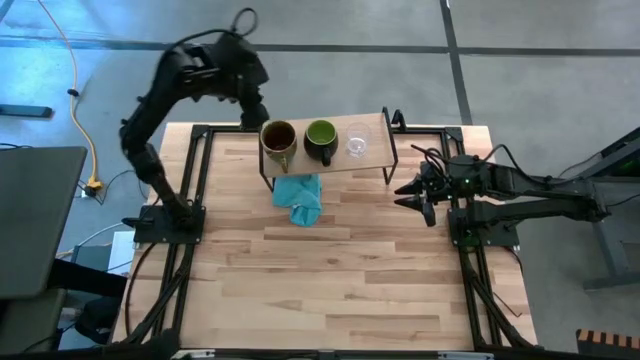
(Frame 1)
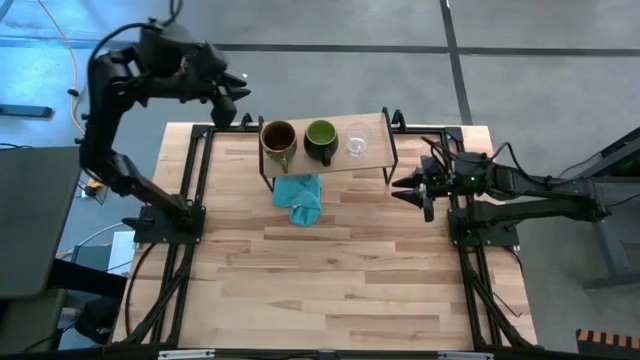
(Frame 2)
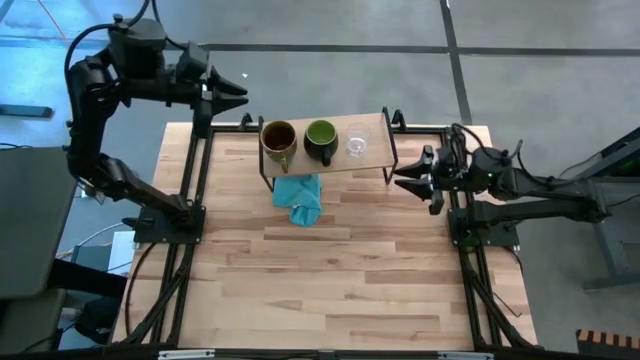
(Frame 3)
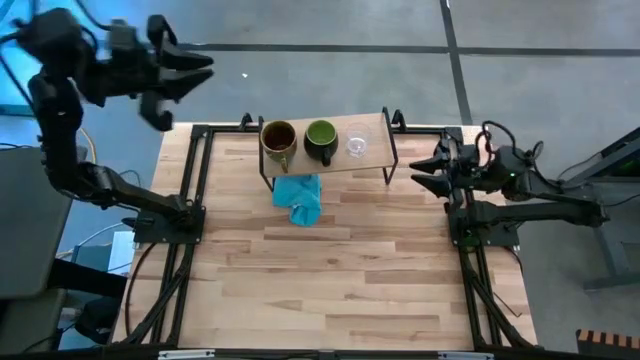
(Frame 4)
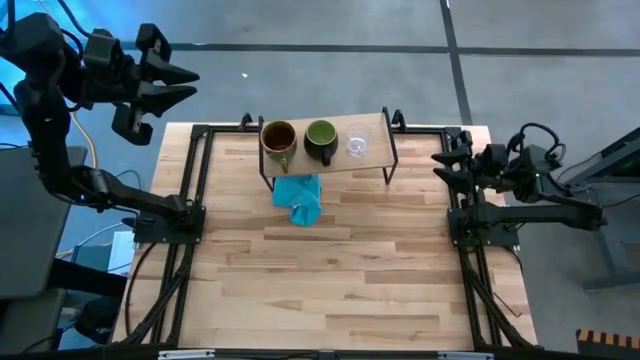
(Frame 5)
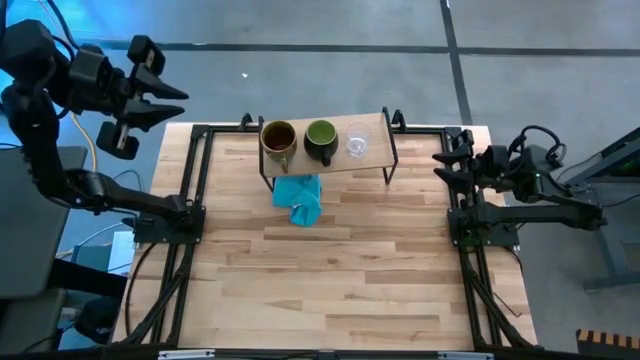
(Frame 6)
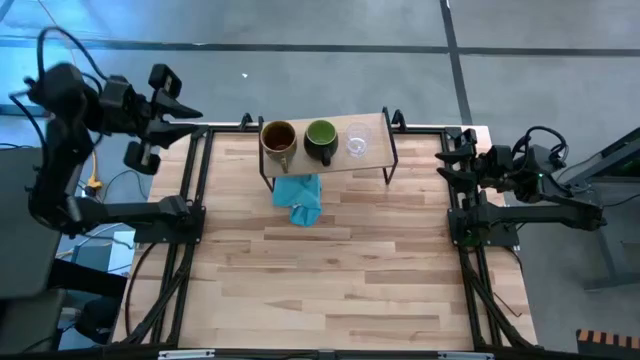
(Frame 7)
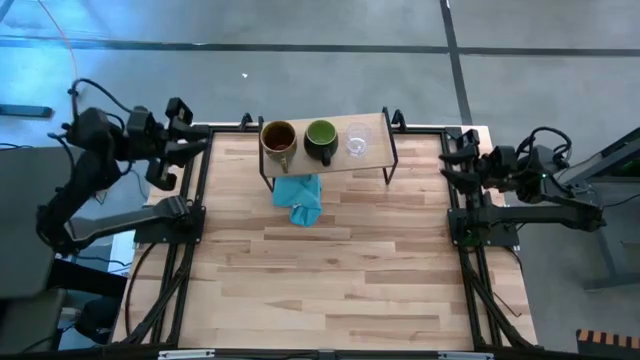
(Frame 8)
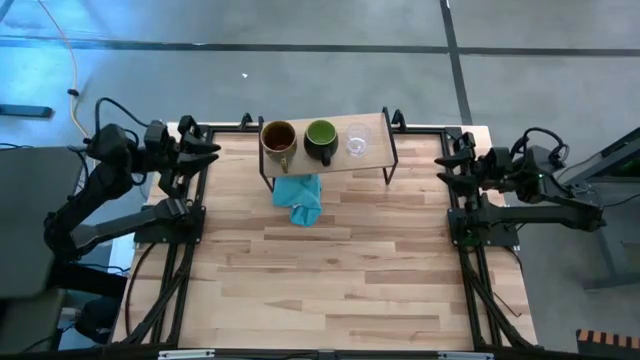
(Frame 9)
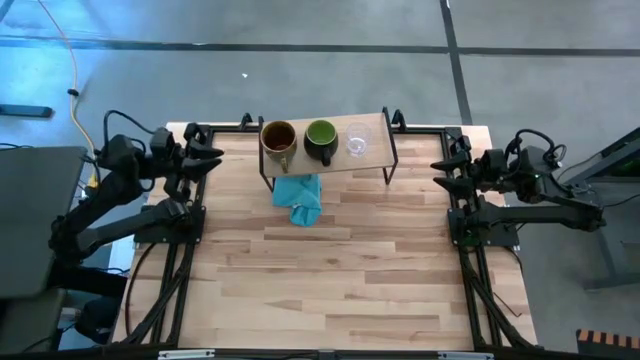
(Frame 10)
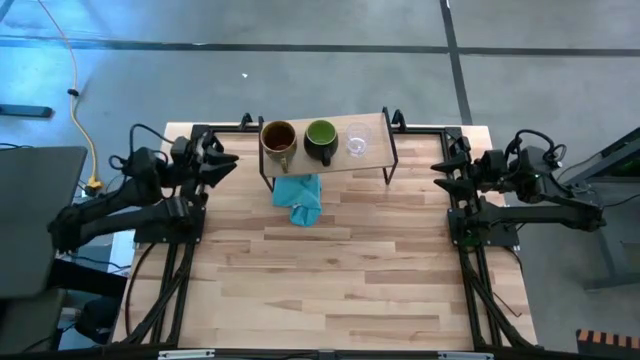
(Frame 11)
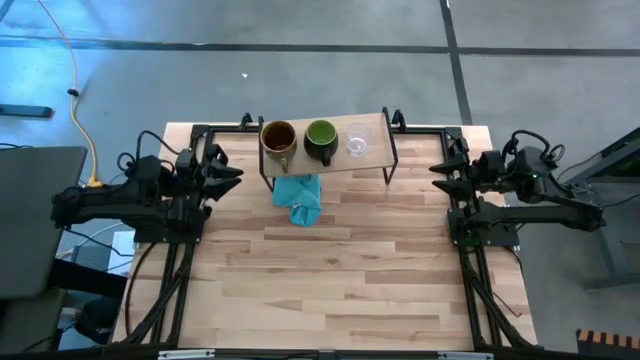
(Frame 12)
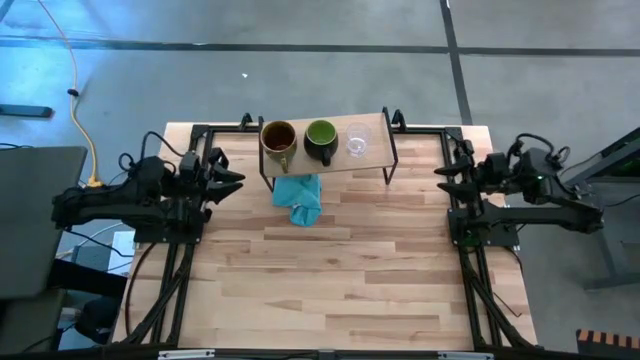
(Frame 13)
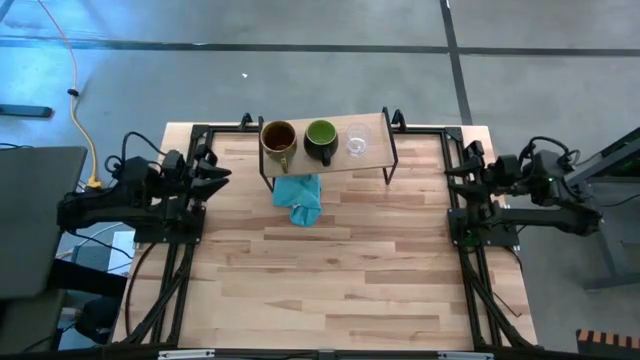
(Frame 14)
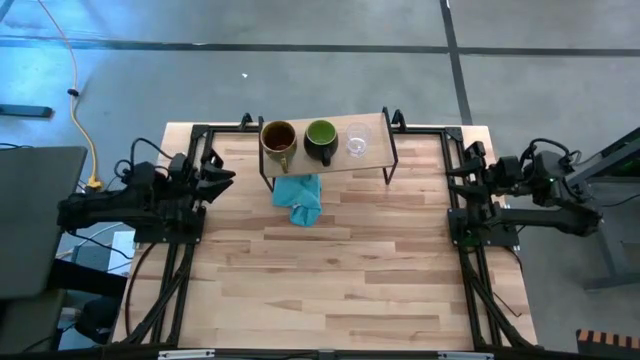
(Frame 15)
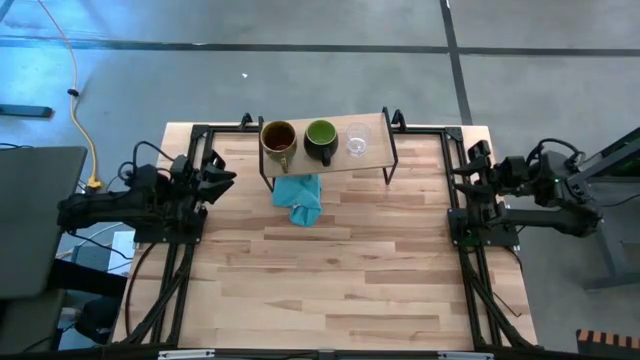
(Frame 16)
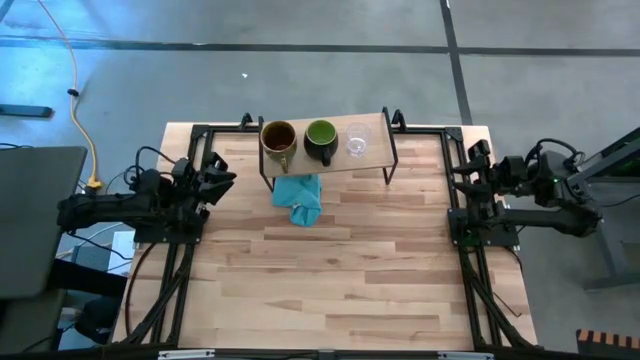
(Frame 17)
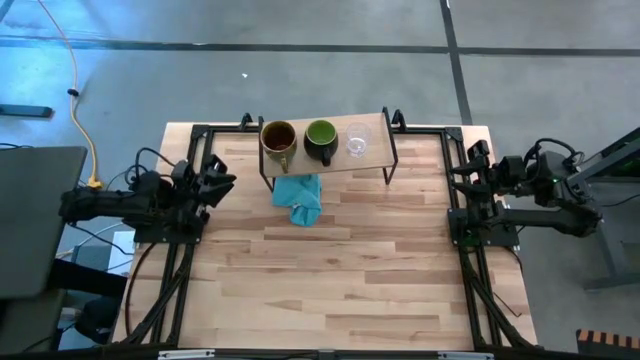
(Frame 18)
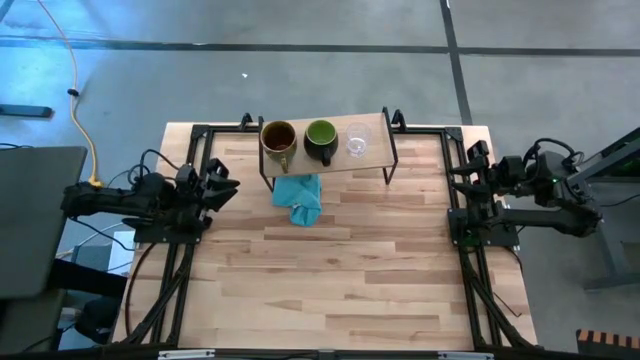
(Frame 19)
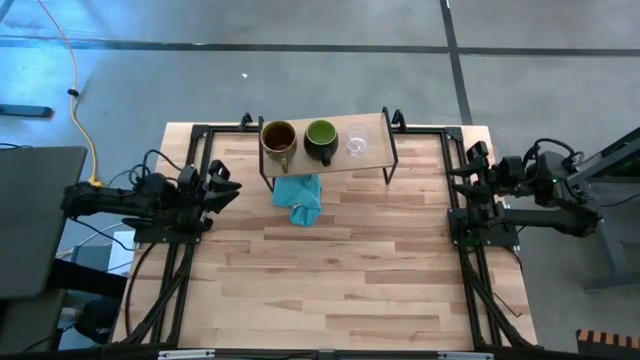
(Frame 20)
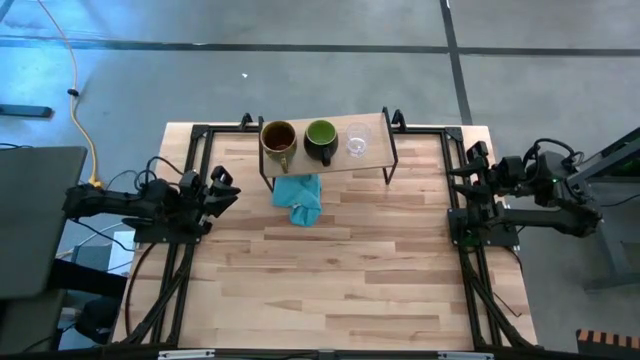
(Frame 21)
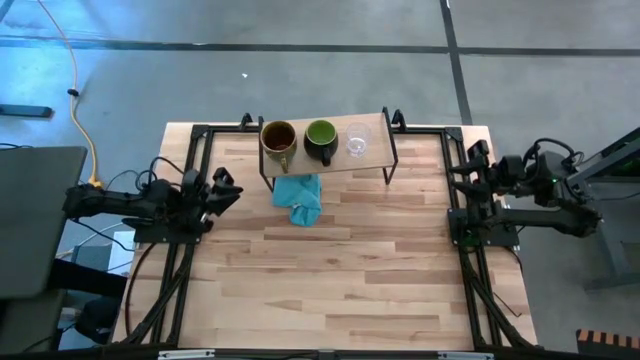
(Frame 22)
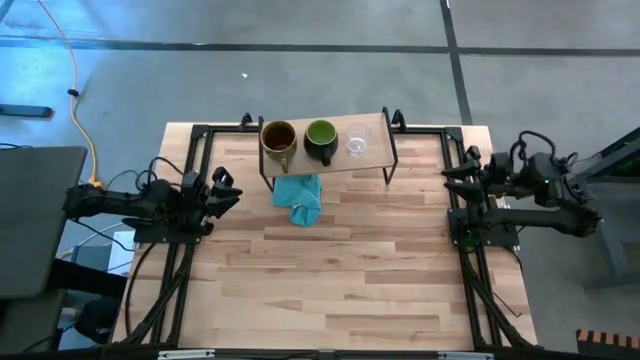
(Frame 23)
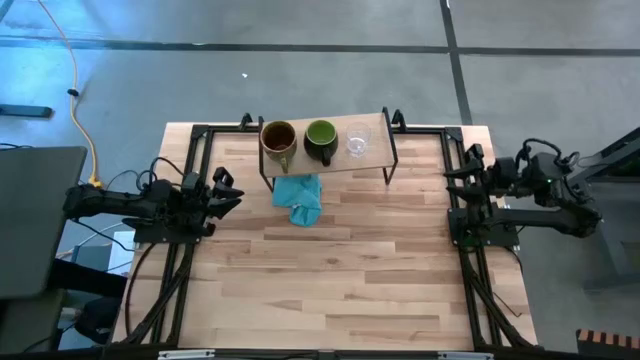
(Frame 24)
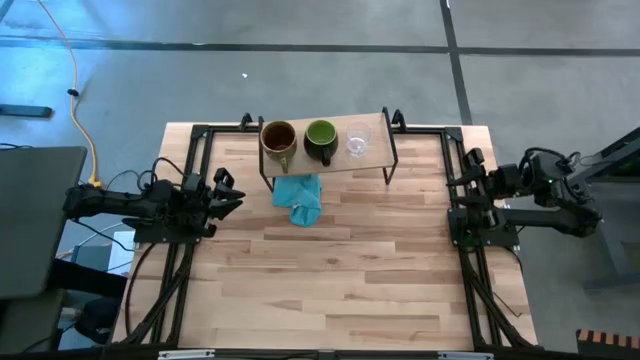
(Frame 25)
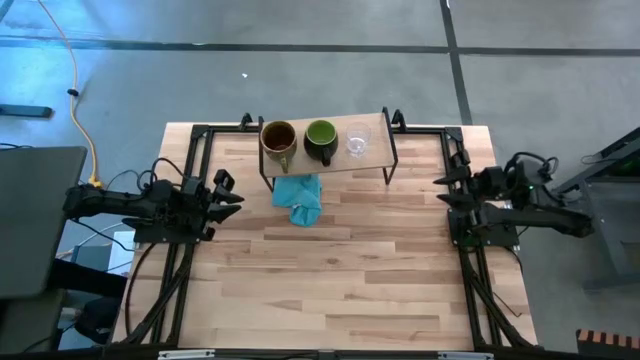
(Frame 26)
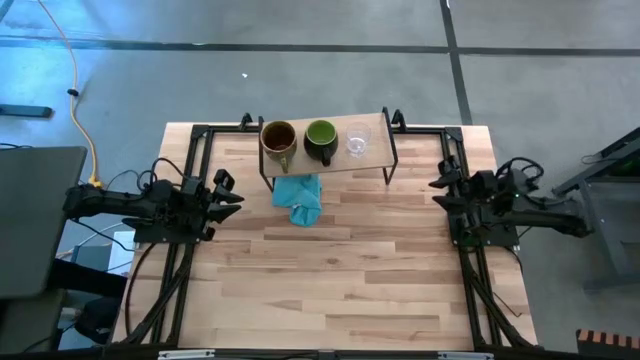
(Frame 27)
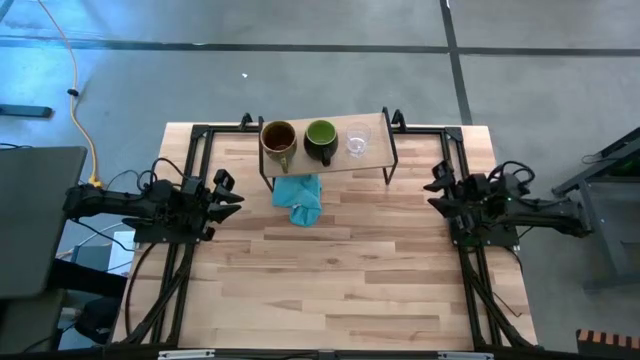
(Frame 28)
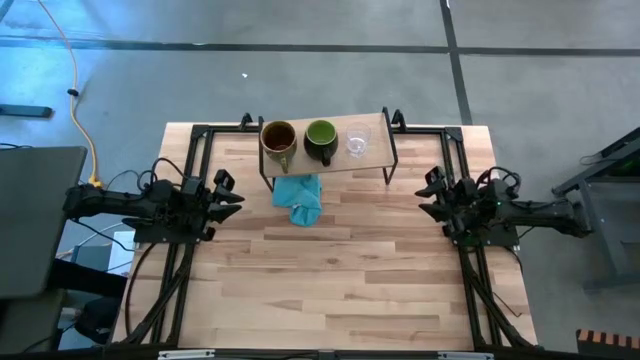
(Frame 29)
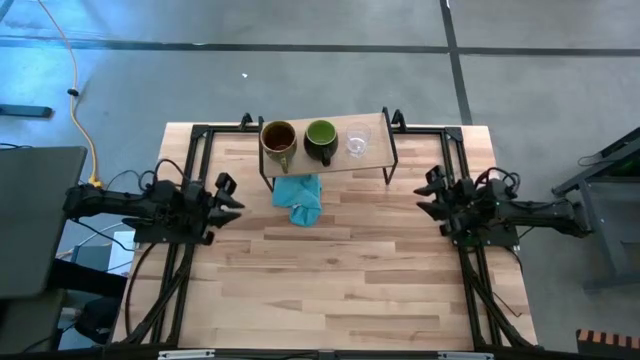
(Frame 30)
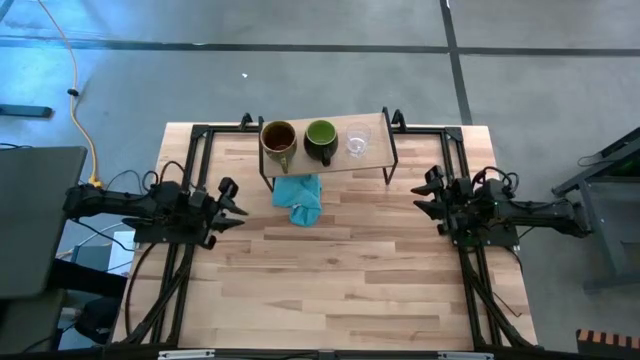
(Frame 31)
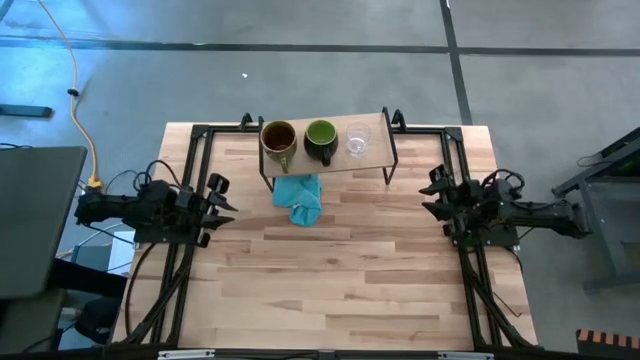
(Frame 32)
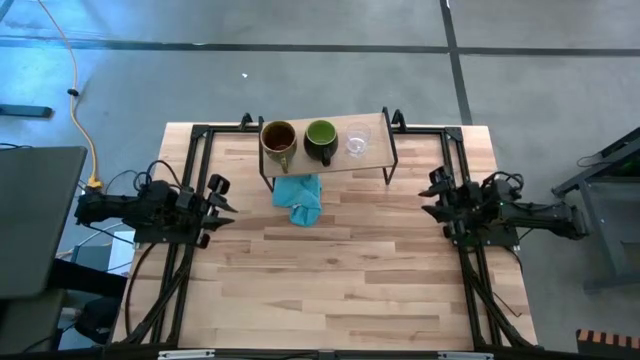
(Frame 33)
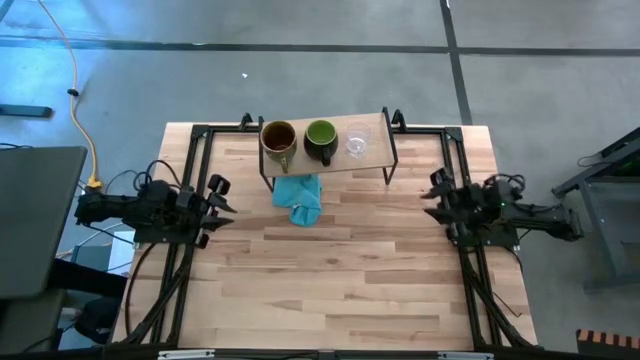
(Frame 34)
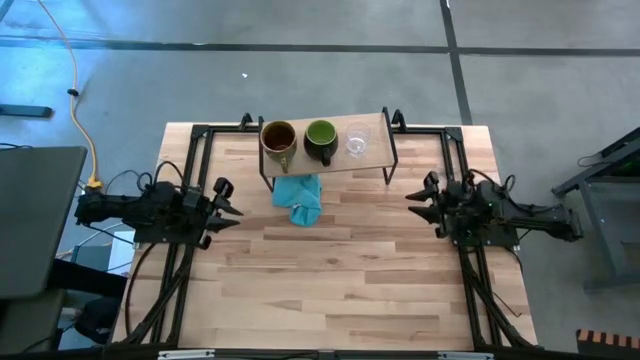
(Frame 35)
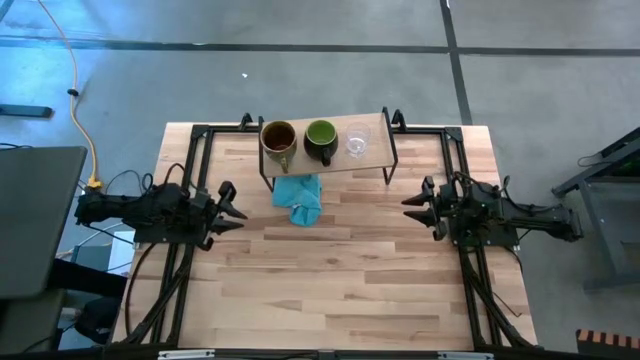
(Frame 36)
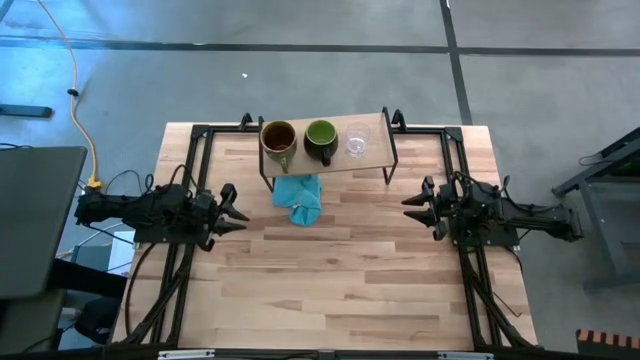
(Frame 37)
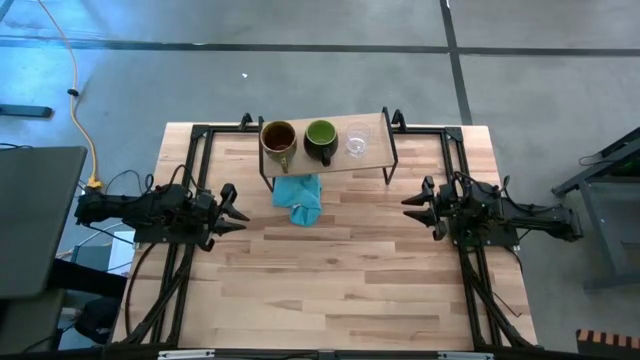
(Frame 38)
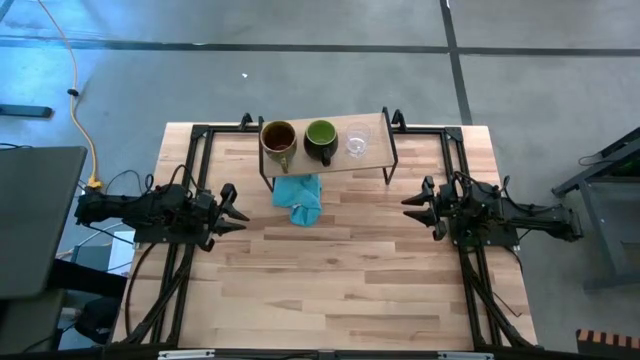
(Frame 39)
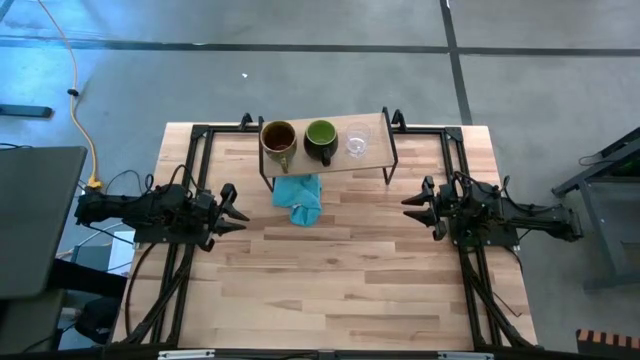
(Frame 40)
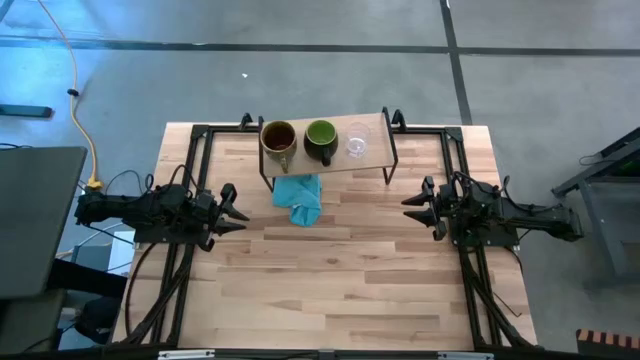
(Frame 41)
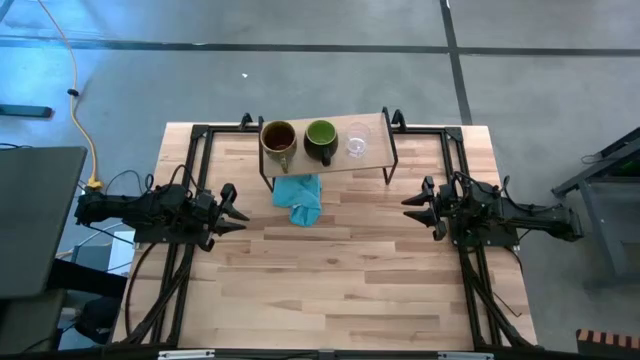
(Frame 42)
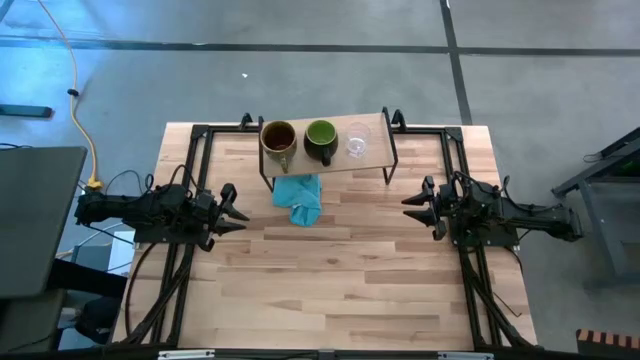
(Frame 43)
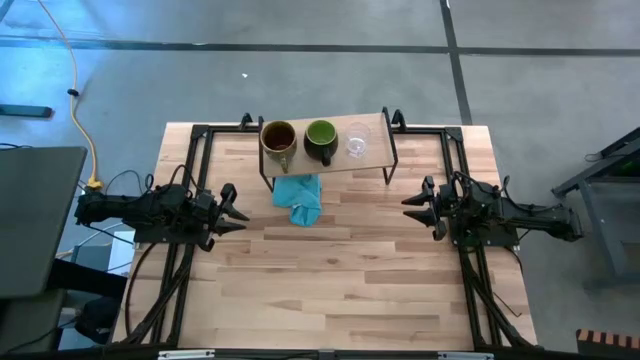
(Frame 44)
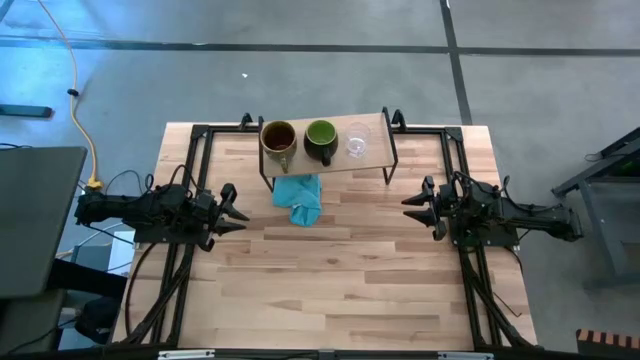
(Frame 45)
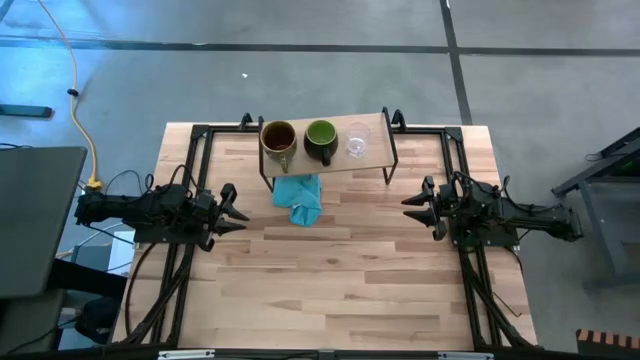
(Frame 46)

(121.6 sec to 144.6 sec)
Task: Stack small to large cups/mugs on shelf
Return to Home Position
